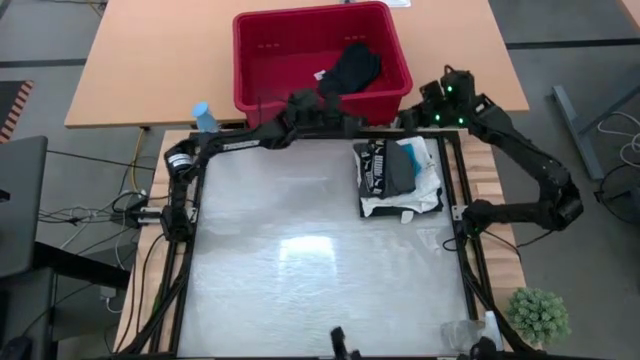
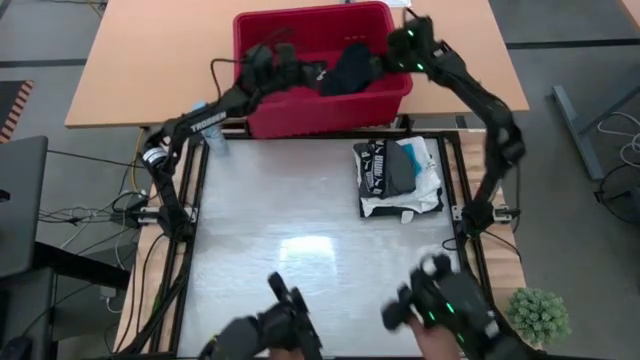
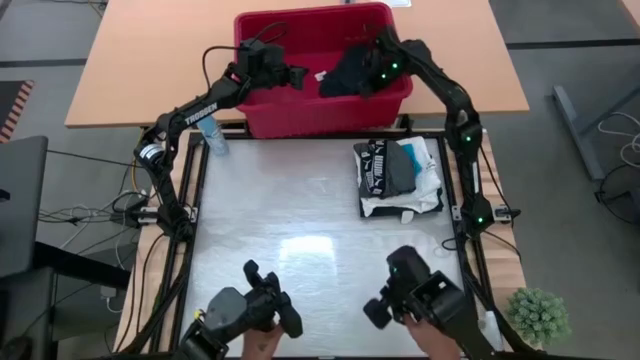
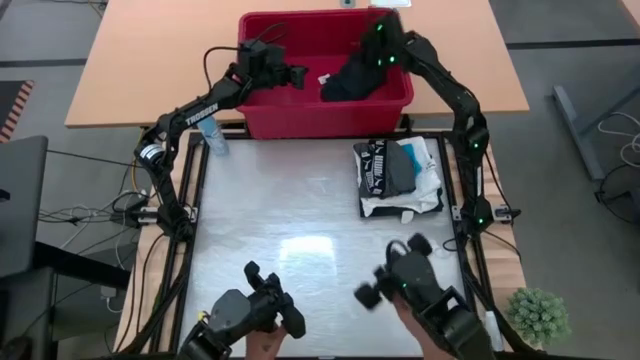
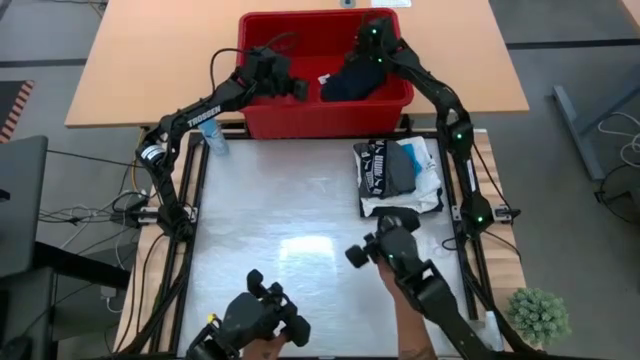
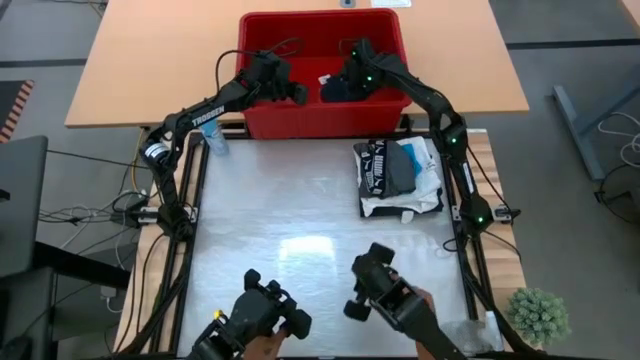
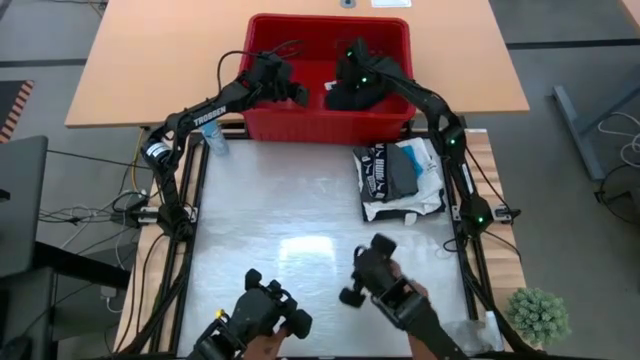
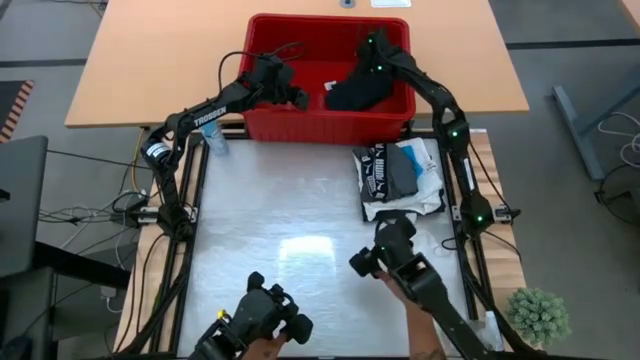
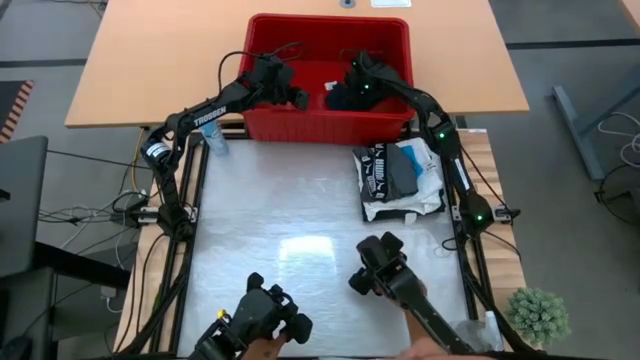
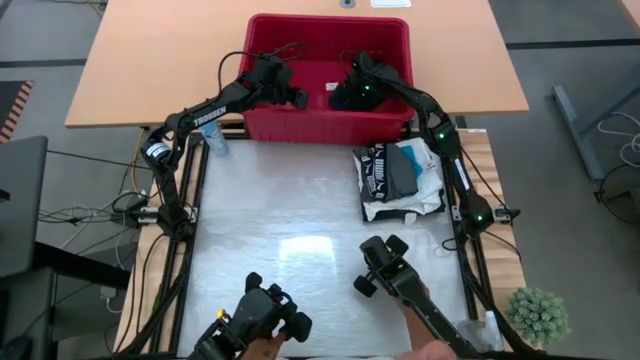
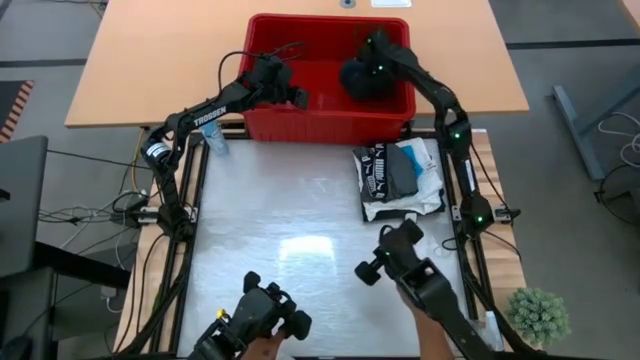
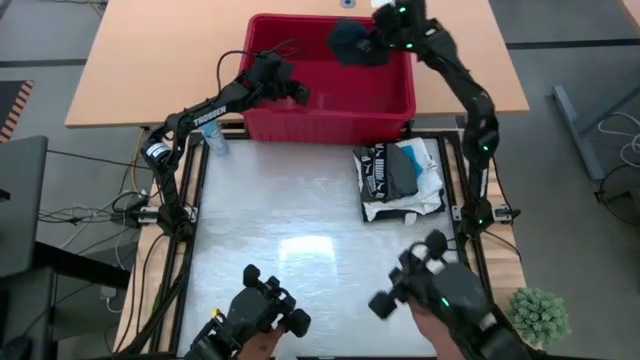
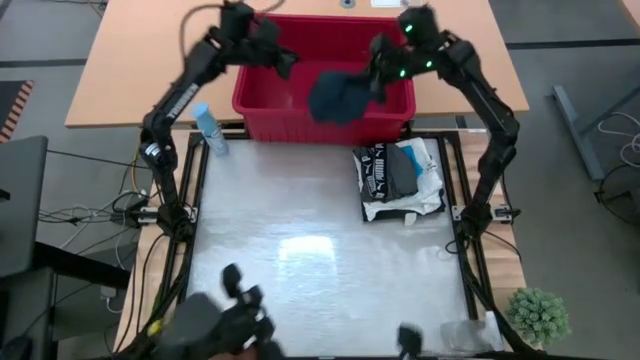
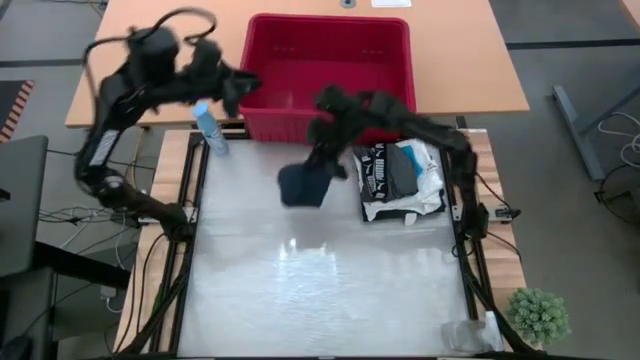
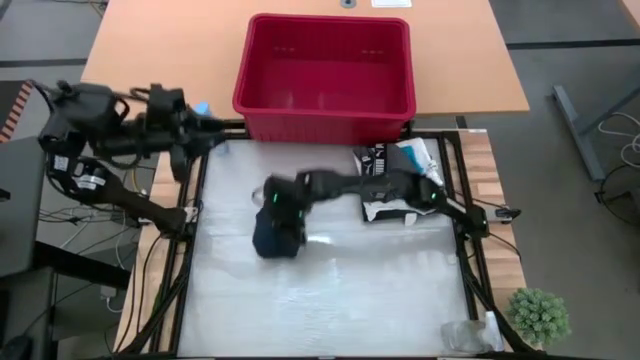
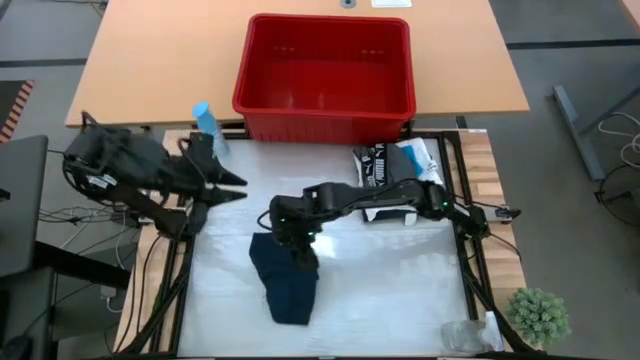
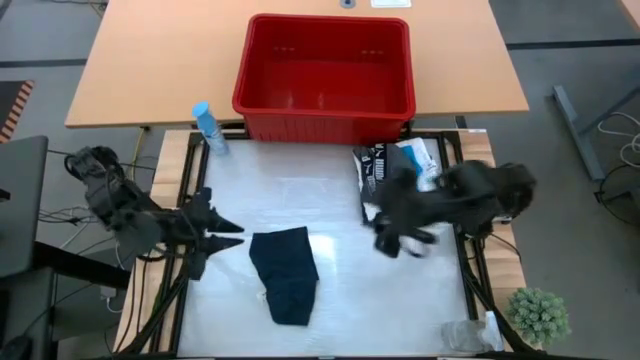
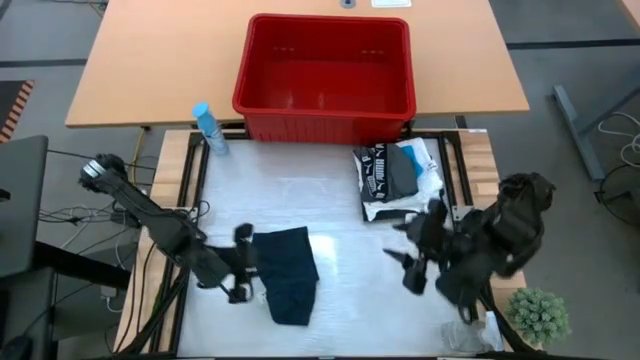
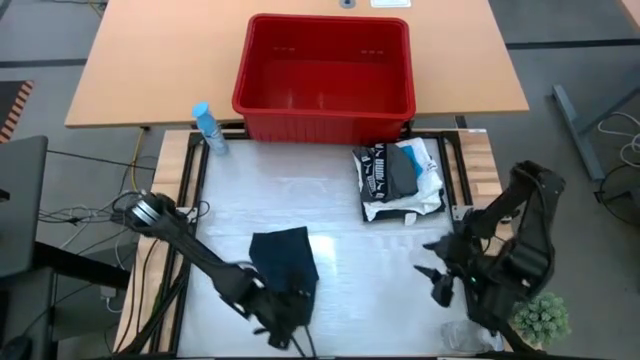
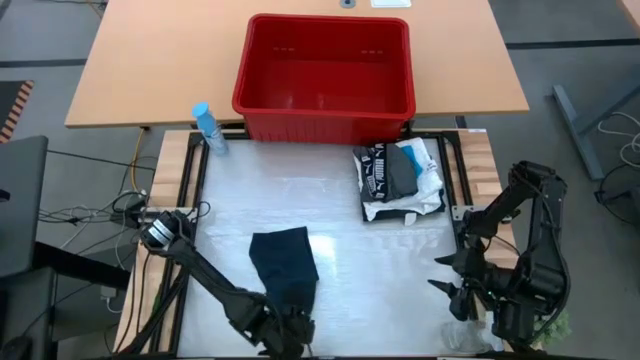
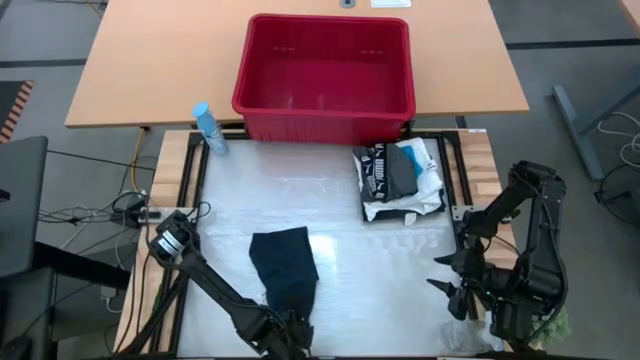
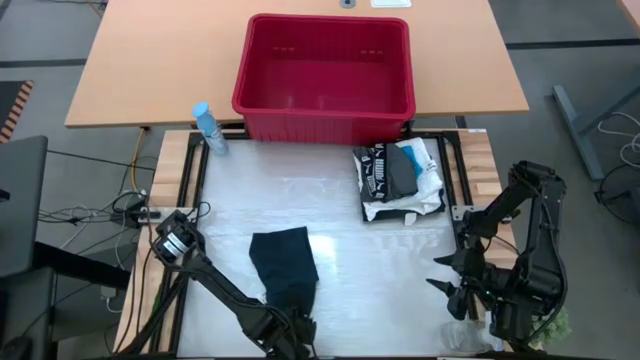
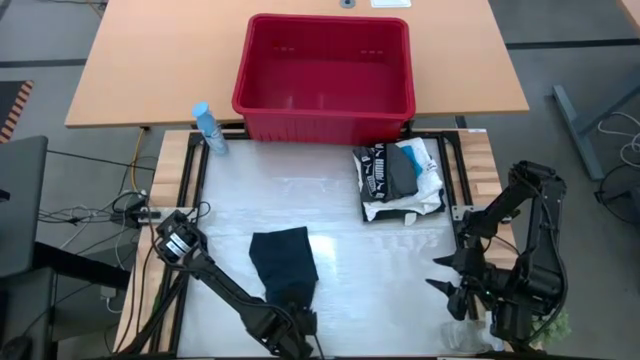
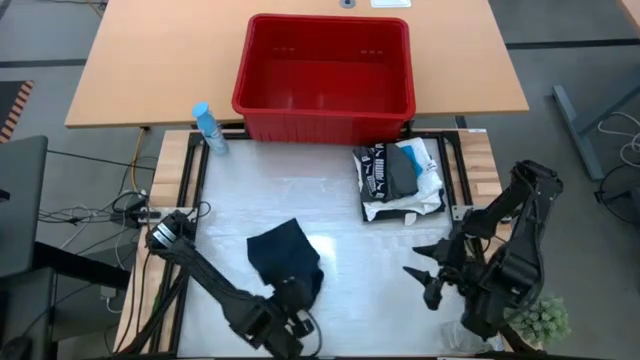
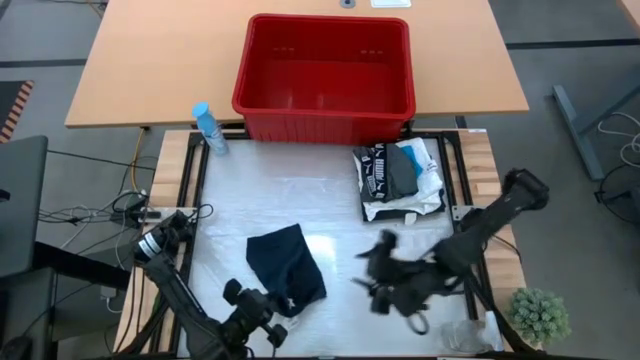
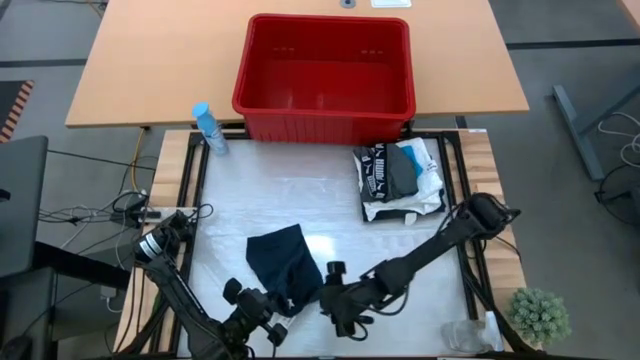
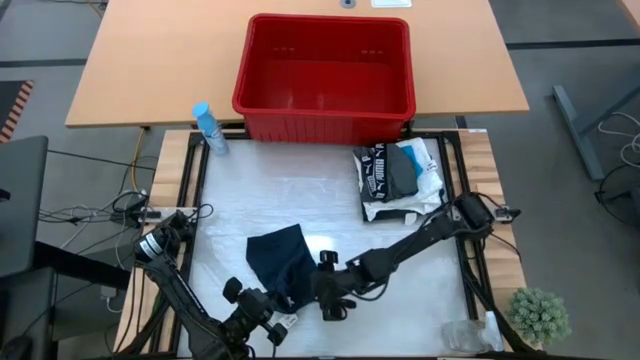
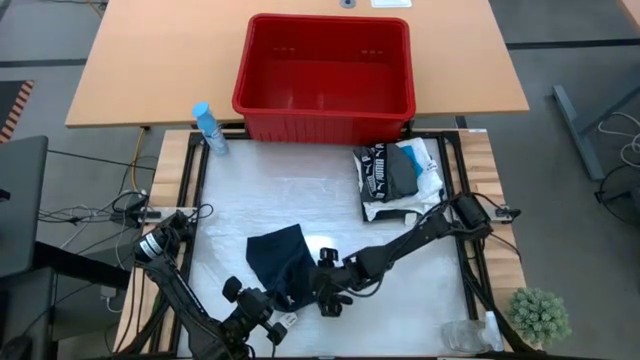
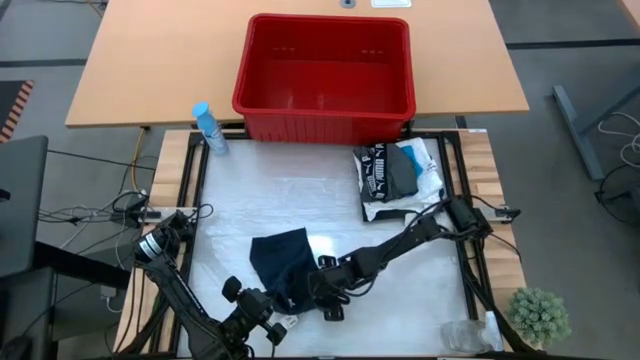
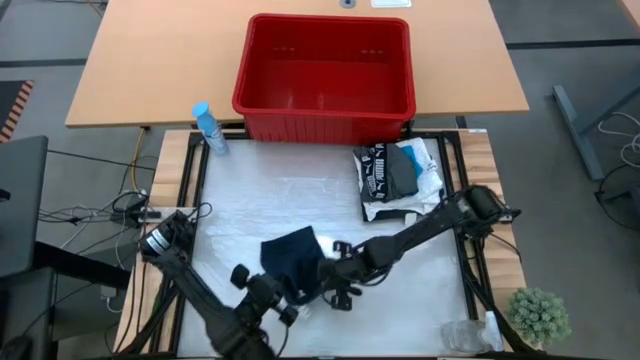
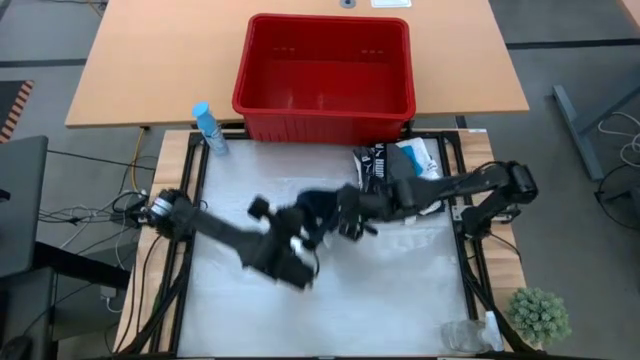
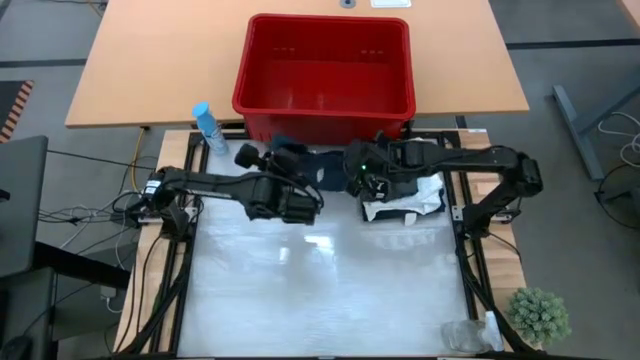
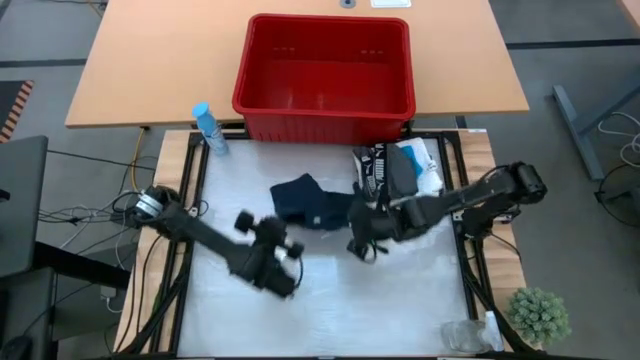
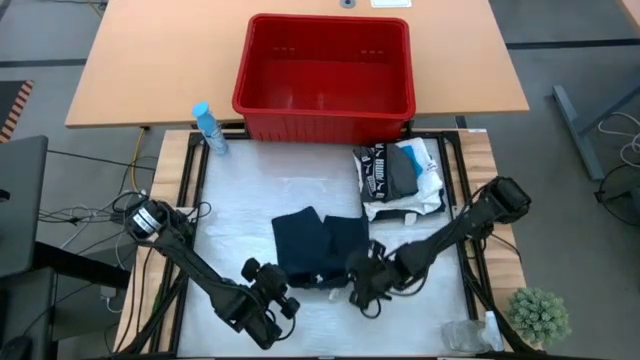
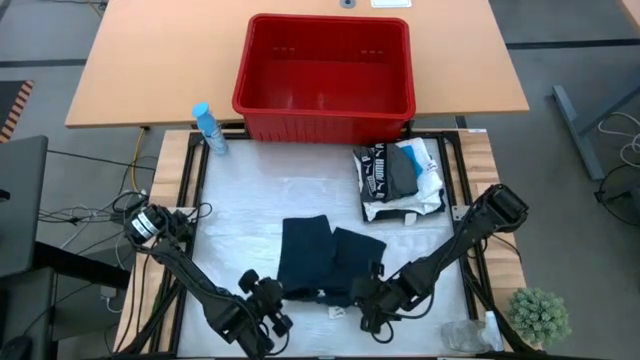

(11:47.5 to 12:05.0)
Task: Fold laundry
Fold the black shorts

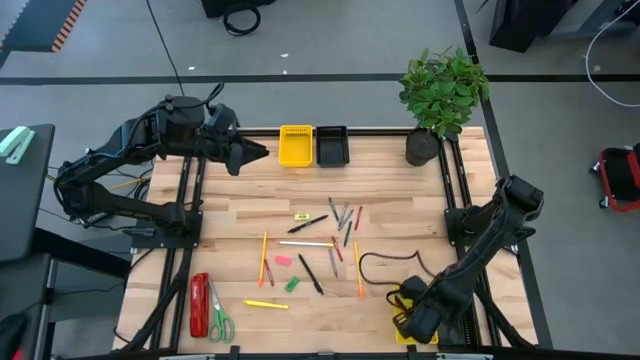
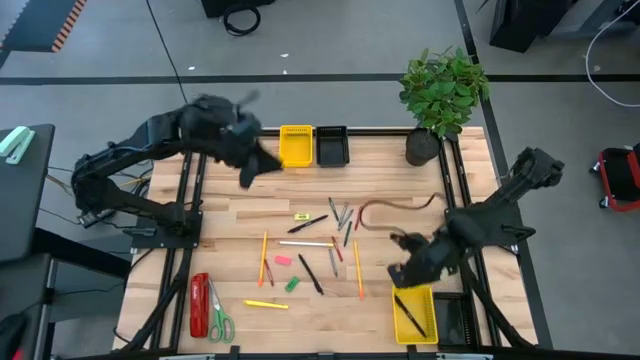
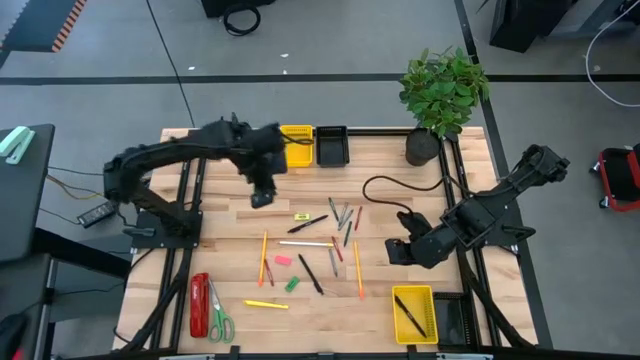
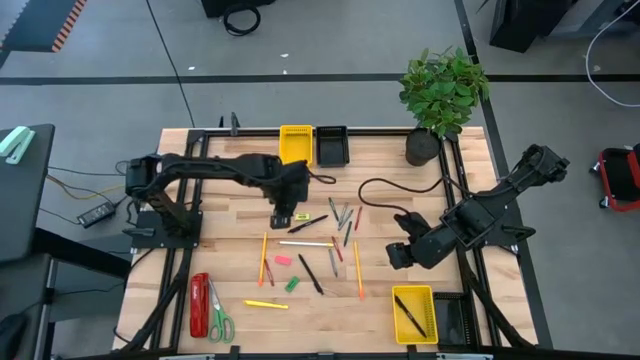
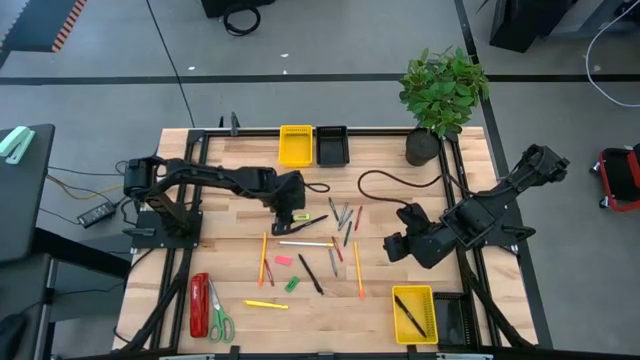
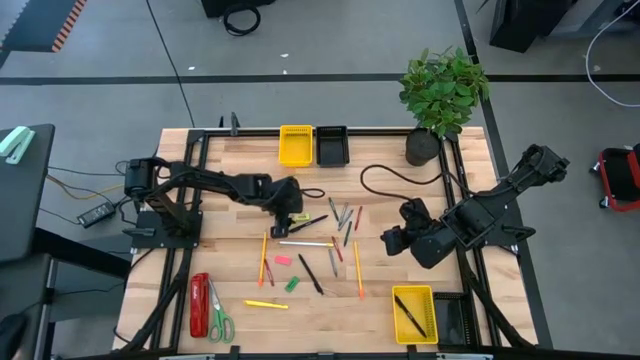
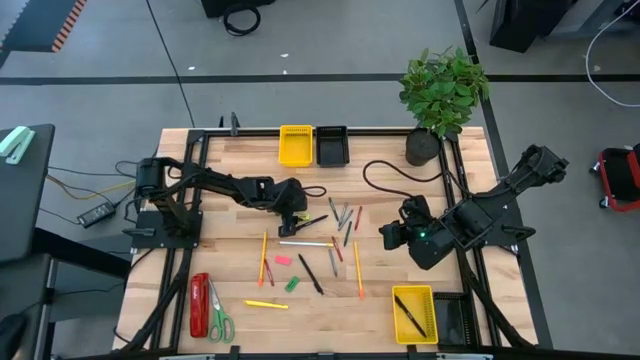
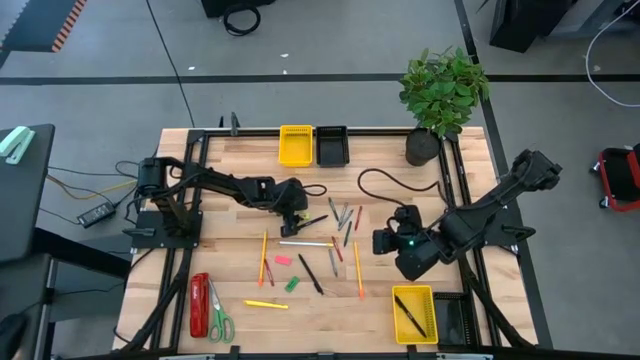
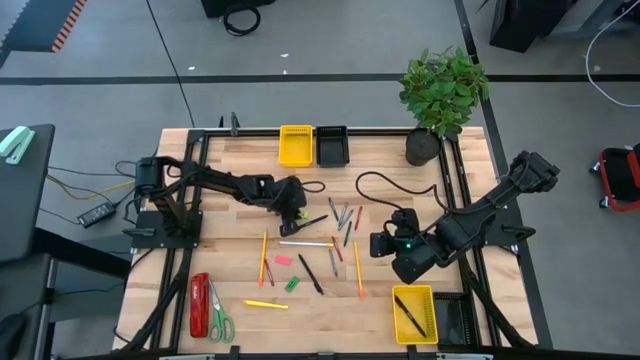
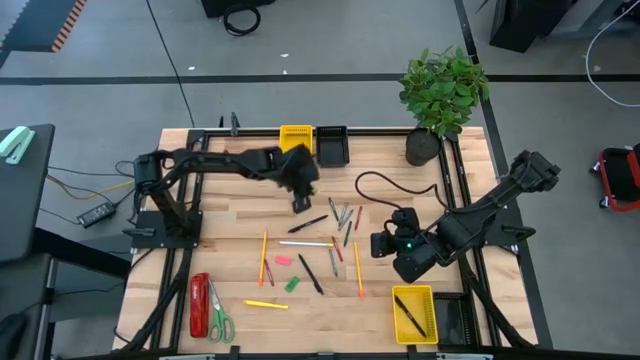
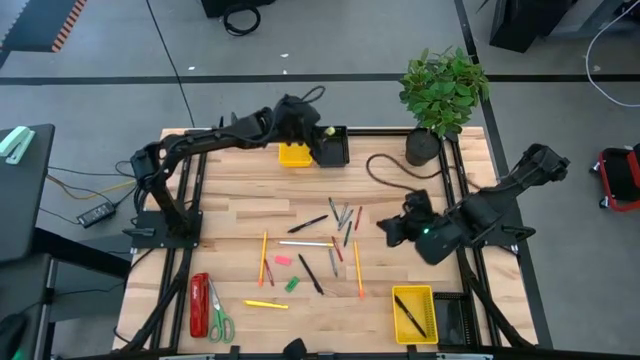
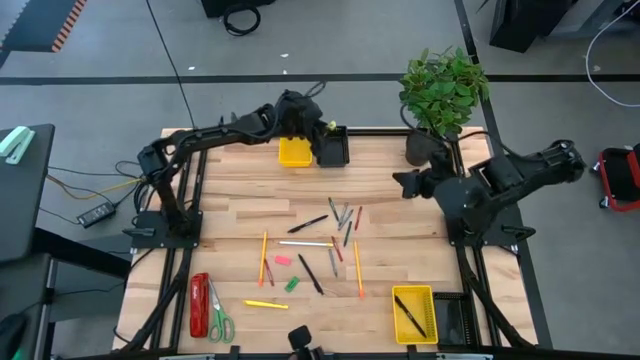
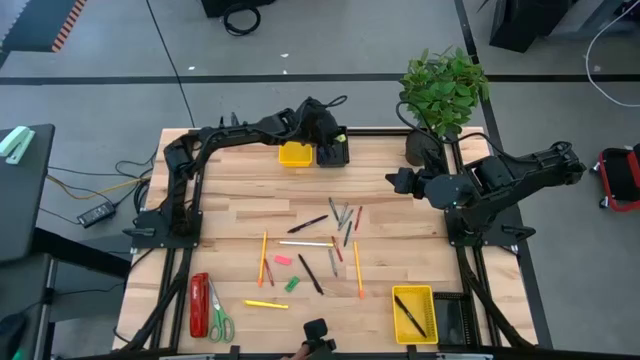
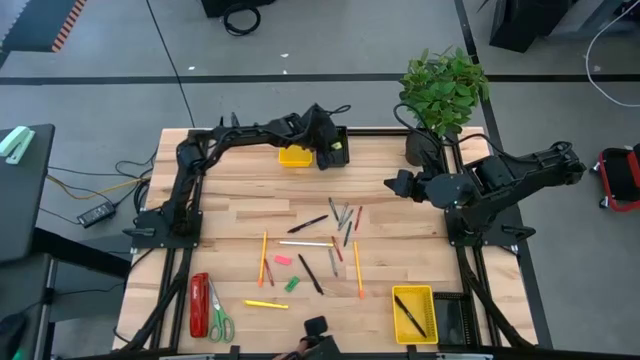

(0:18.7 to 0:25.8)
Task: Sort crayons/erasers/pens/pencils in bins
Put the yellow eraser into the top black bin
